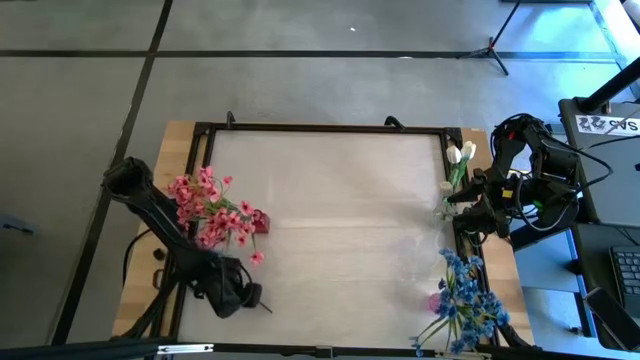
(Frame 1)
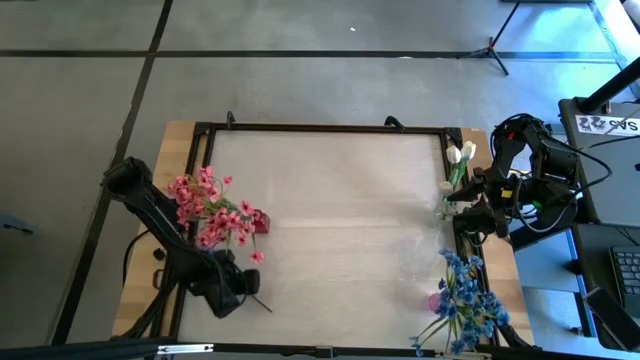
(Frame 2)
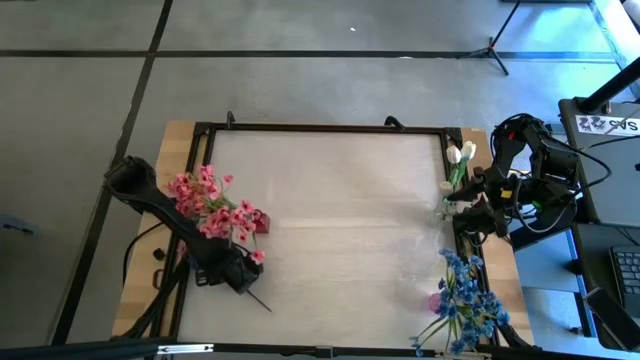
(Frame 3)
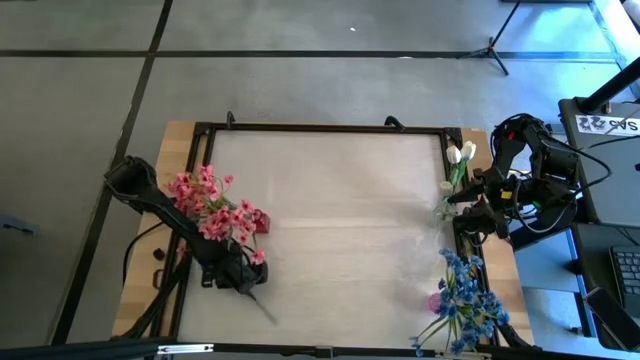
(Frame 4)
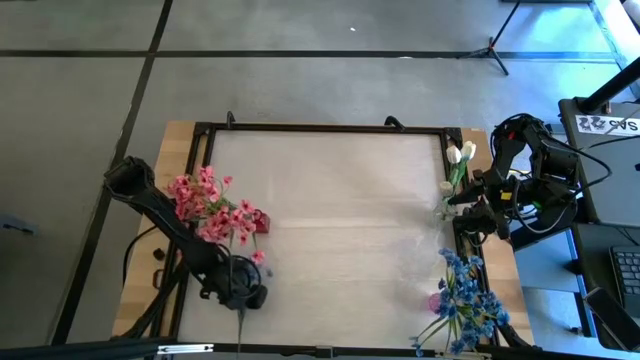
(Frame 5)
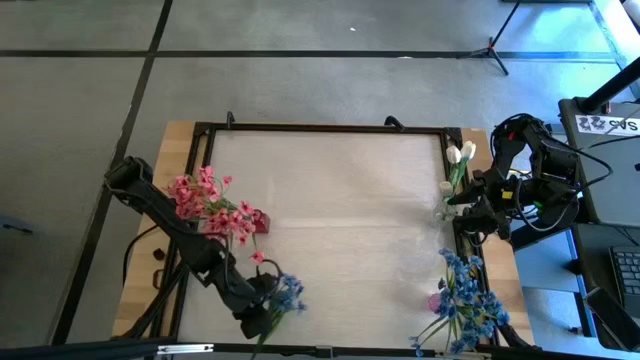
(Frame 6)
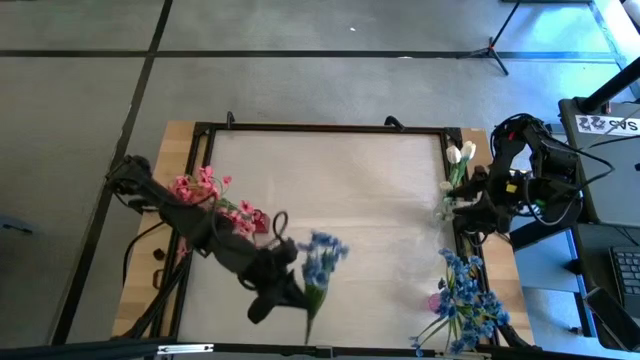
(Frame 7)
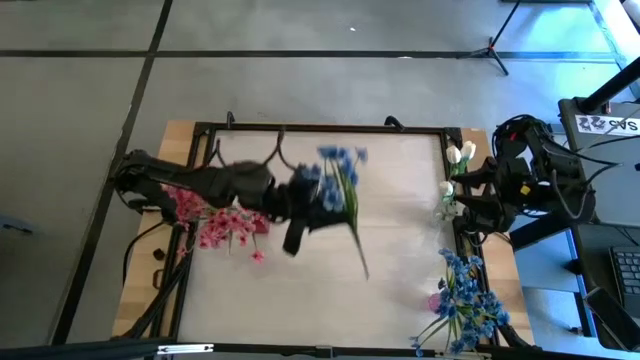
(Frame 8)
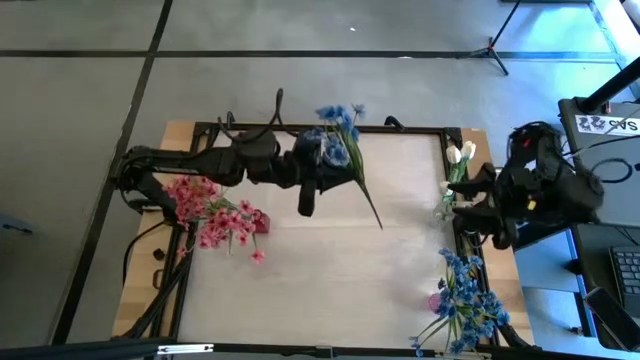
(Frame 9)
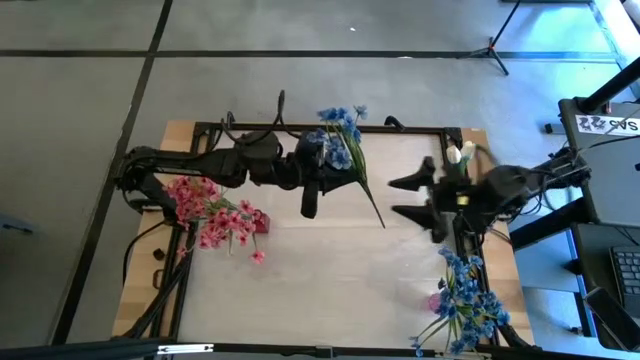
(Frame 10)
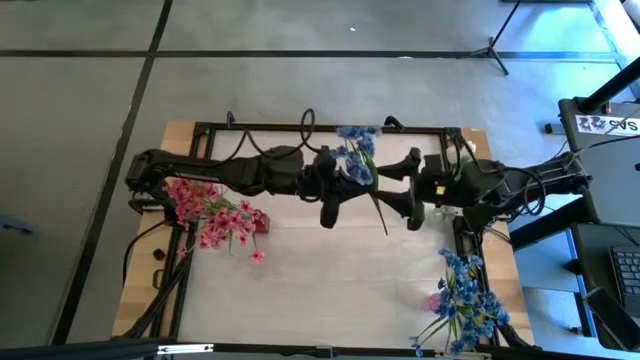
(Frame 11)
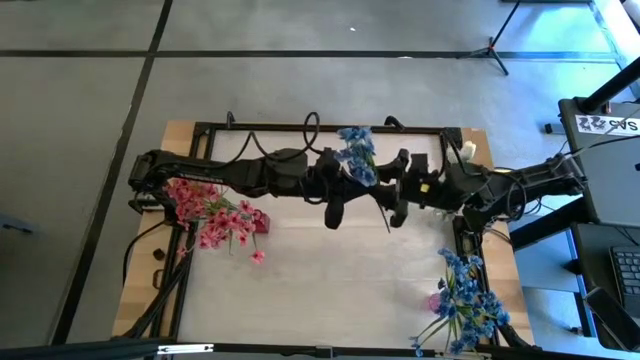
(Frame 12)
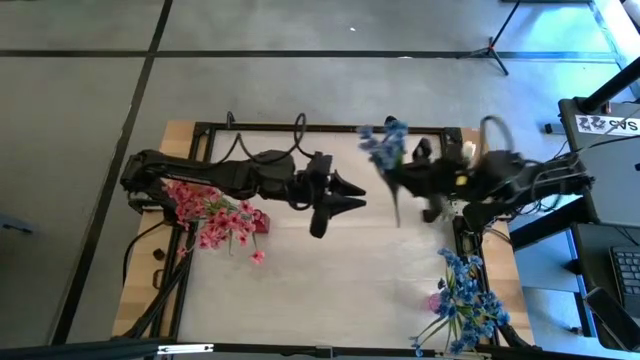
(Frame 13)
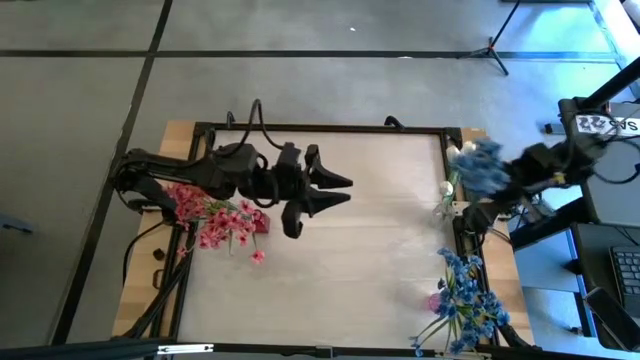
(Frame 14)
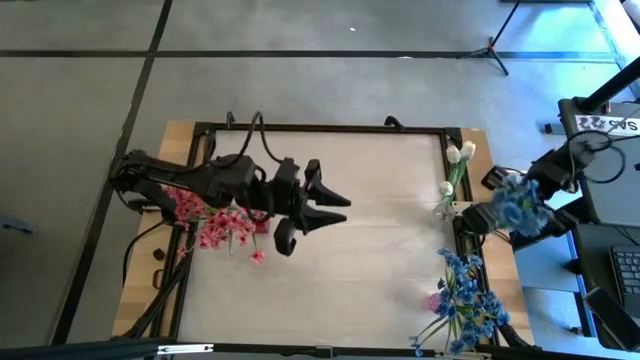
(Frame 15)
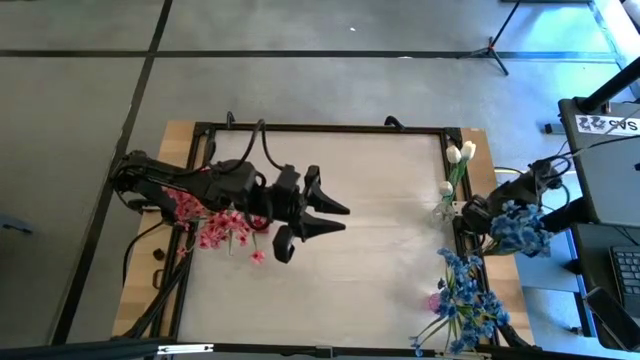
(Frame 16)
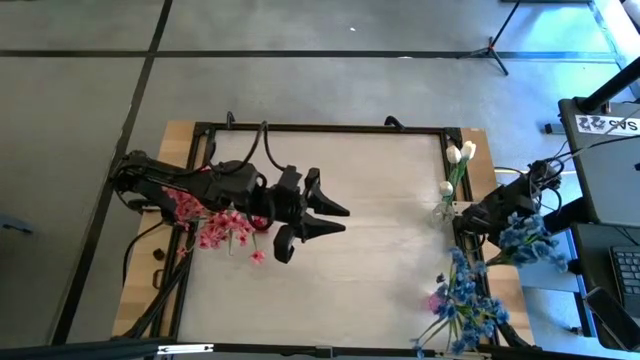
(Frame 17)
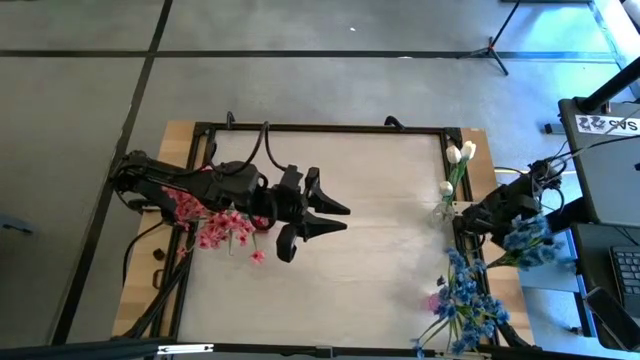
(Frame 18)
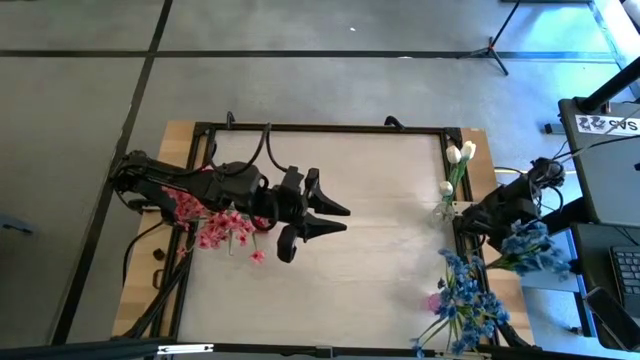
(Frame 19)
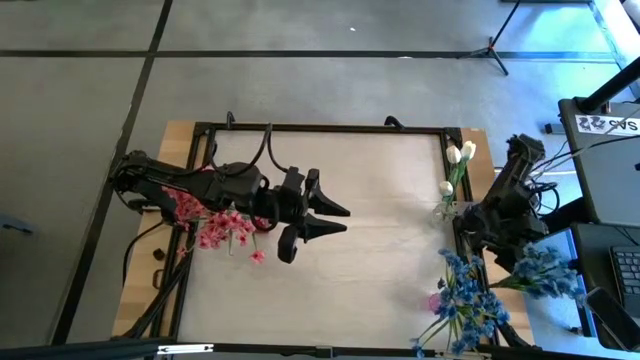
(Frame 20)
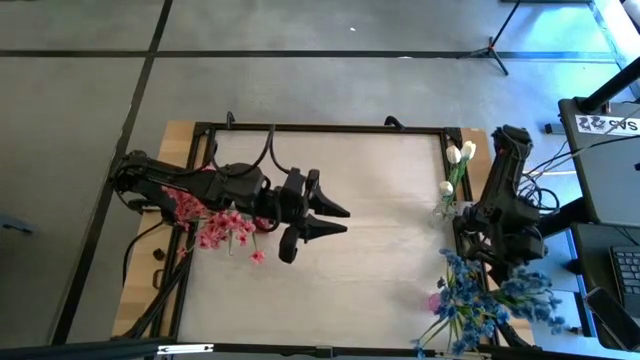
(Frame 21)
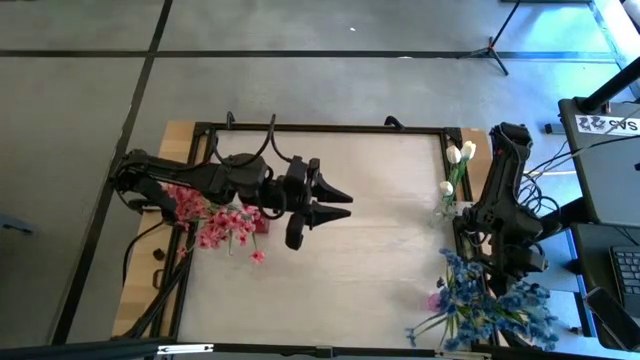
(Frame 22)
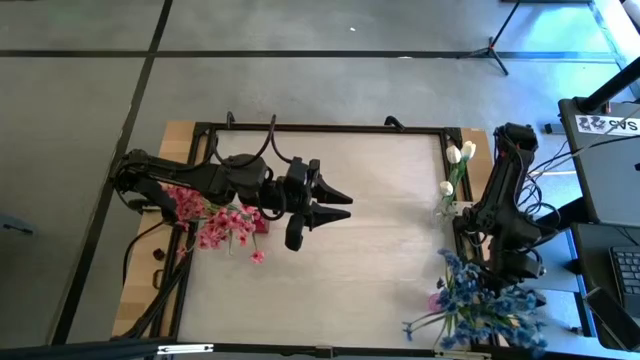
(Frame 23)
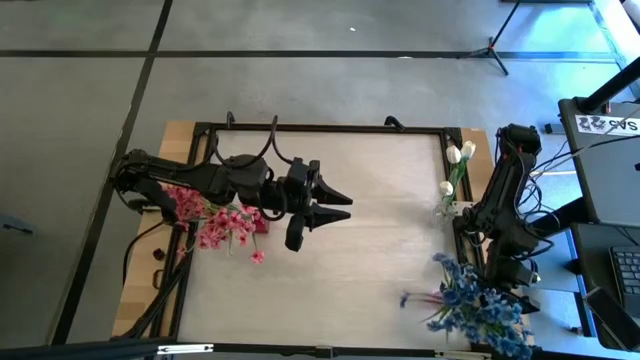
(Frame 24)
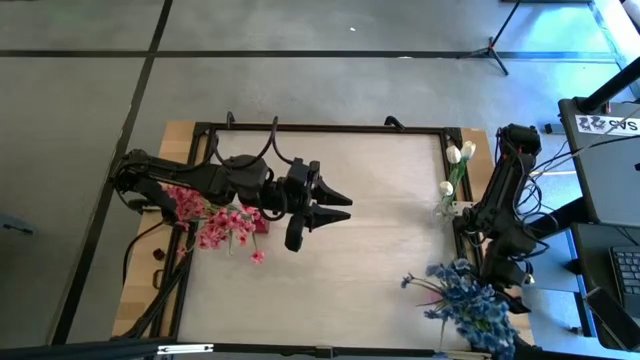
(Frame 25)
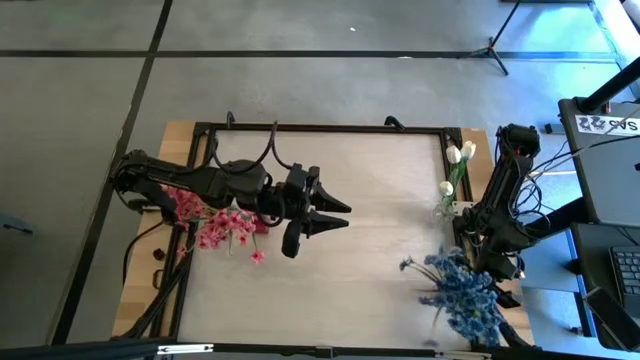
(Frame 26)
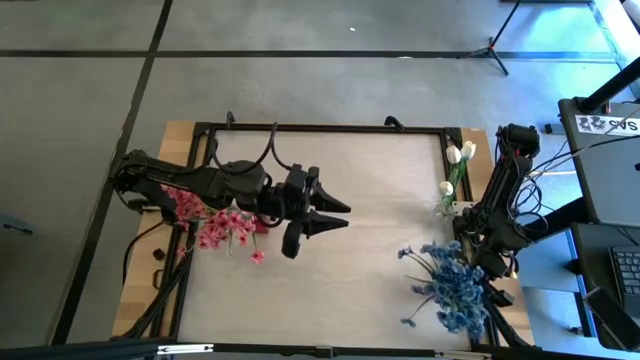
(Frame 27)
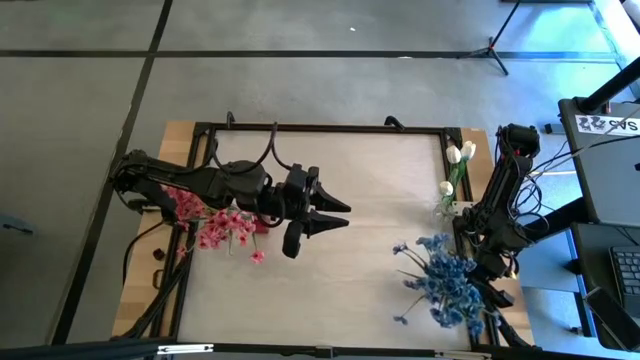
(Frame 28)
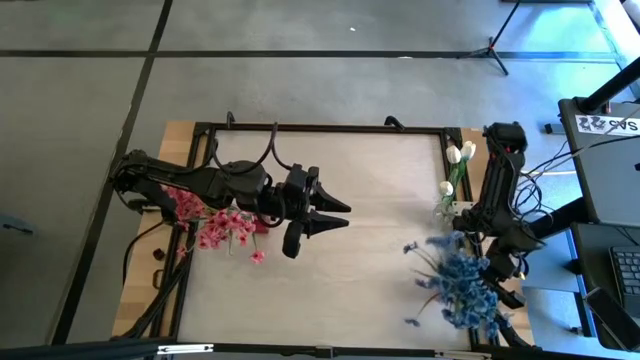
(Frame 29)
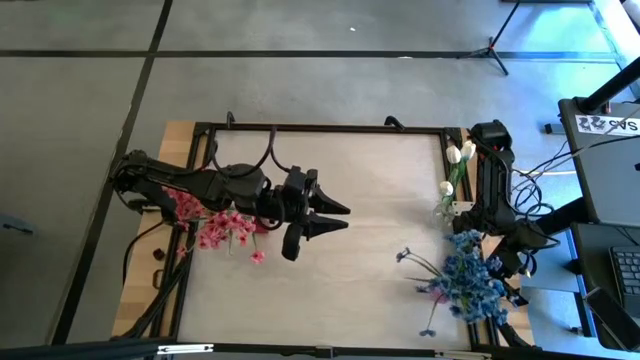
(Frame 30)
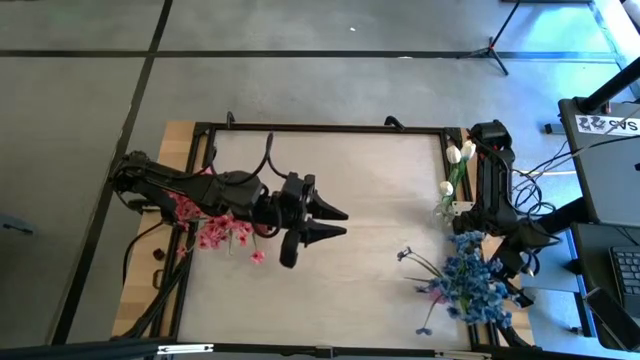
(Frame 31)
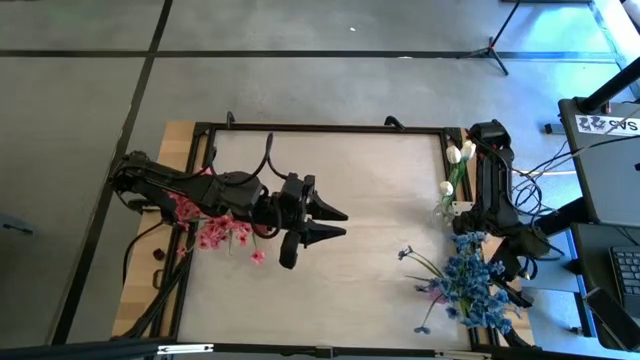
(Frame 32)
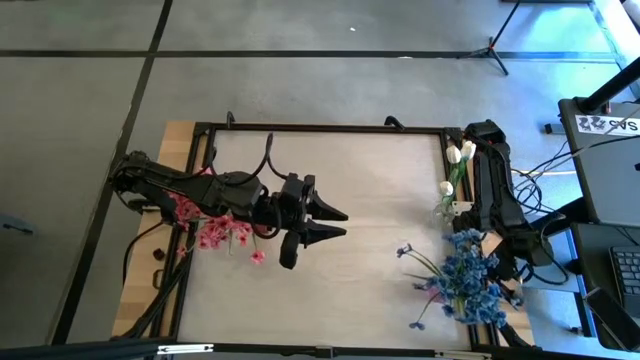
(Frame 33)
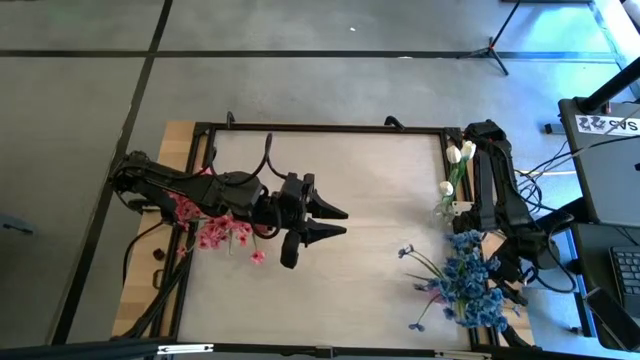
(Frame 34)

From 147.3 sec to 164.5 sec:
Task: Sort flowers into vase by color
Put the blue flowers into the violet vase
